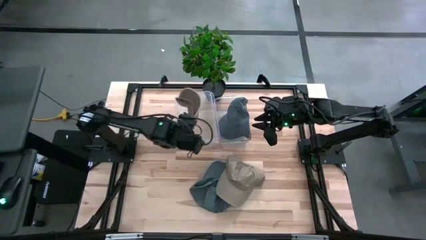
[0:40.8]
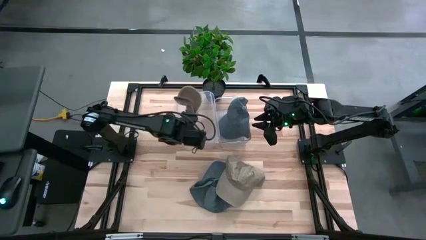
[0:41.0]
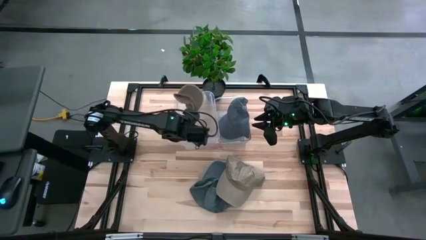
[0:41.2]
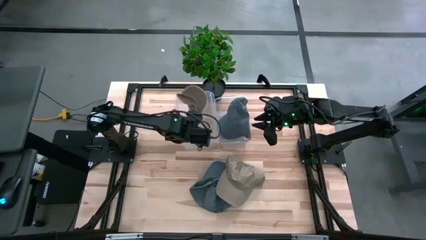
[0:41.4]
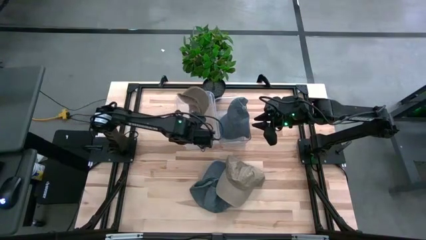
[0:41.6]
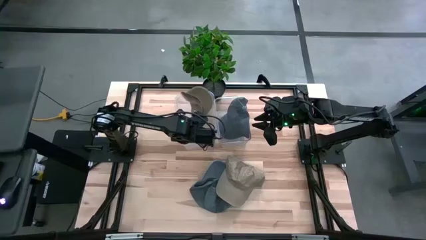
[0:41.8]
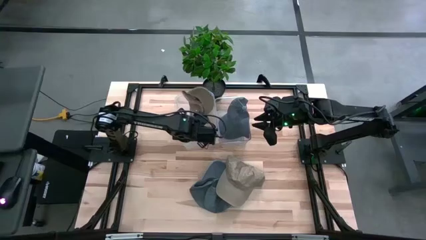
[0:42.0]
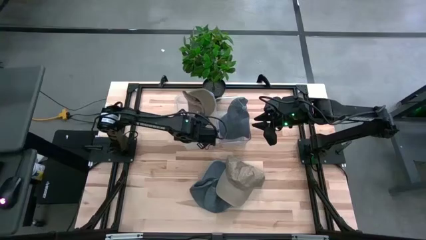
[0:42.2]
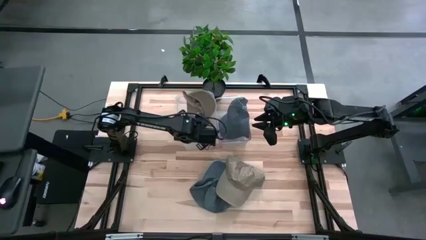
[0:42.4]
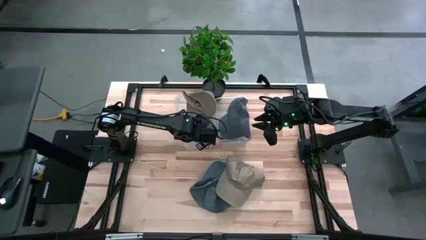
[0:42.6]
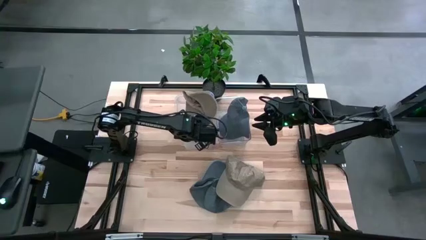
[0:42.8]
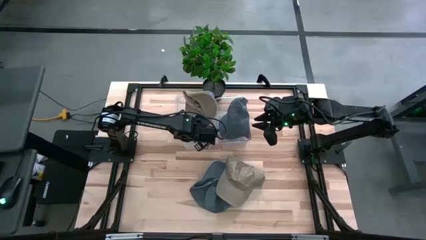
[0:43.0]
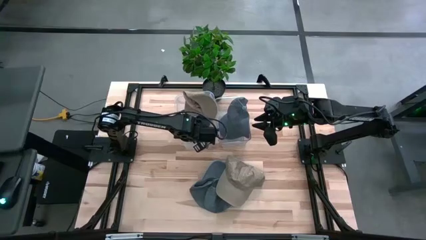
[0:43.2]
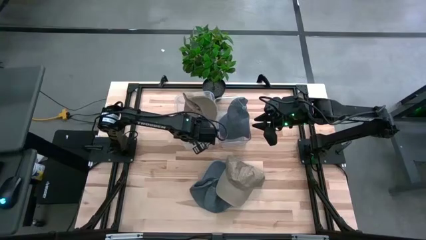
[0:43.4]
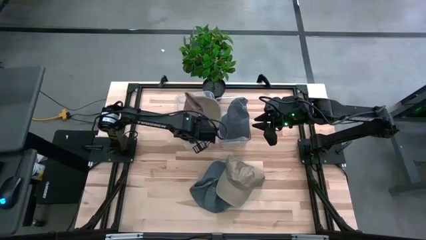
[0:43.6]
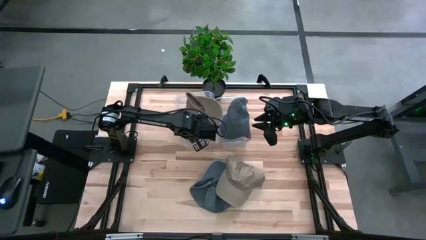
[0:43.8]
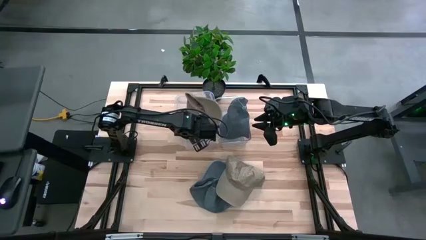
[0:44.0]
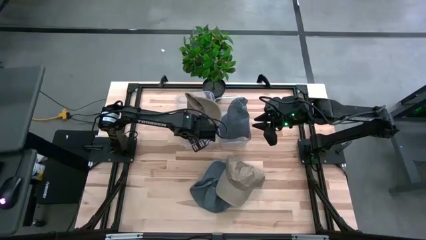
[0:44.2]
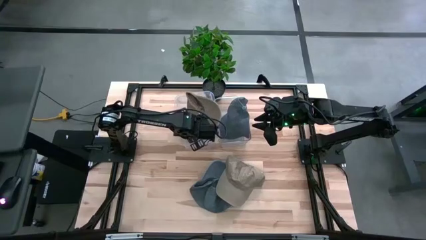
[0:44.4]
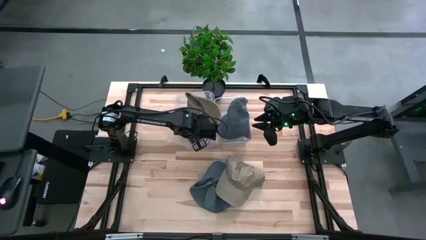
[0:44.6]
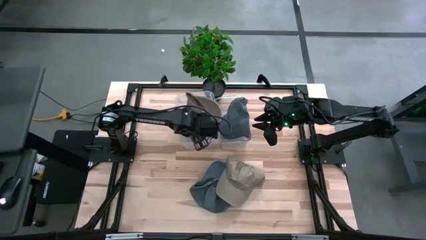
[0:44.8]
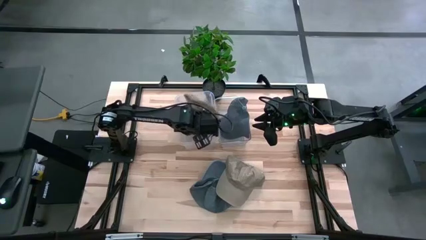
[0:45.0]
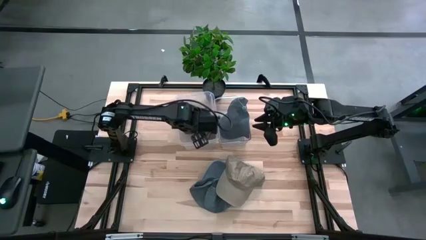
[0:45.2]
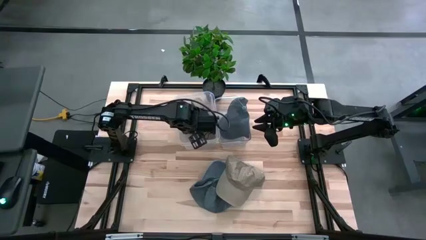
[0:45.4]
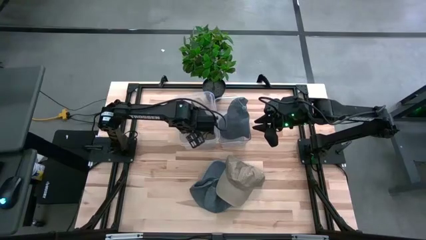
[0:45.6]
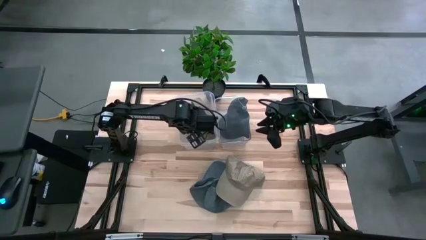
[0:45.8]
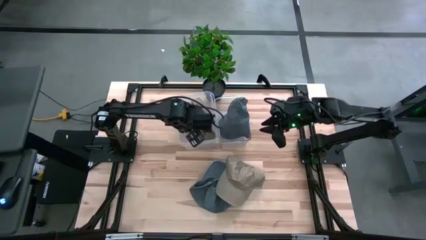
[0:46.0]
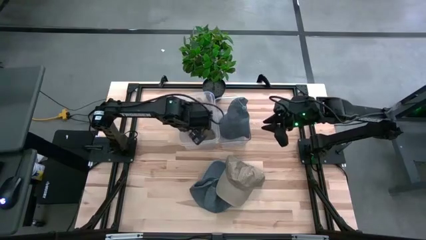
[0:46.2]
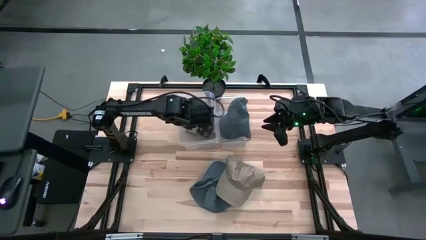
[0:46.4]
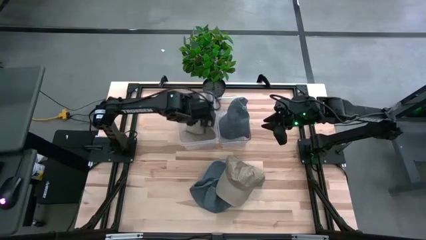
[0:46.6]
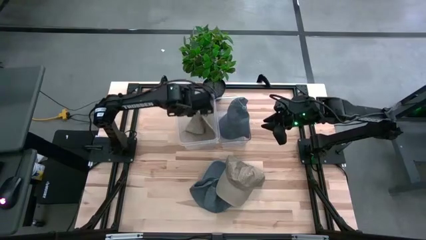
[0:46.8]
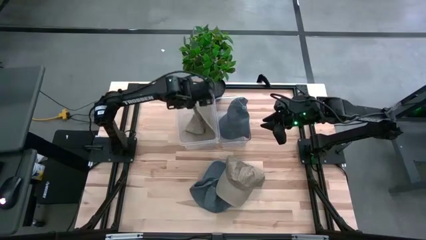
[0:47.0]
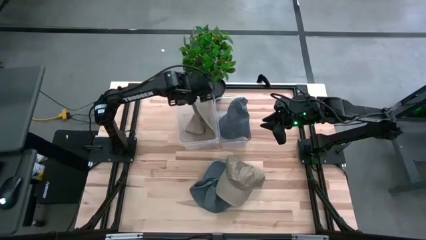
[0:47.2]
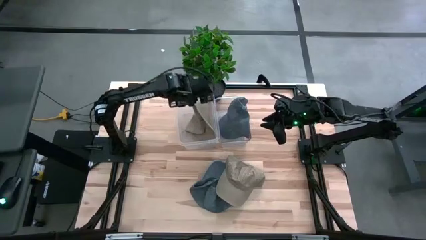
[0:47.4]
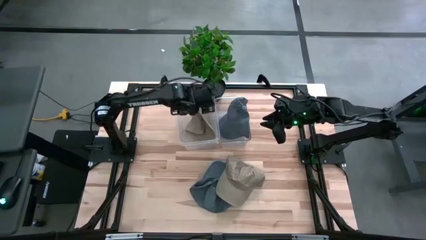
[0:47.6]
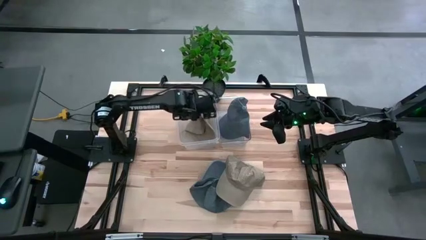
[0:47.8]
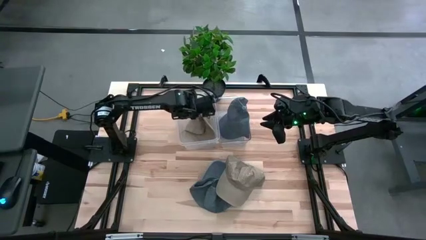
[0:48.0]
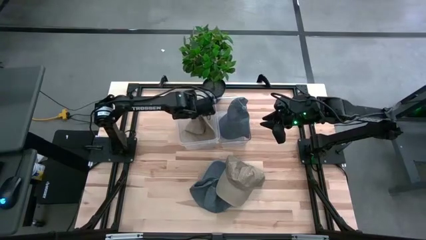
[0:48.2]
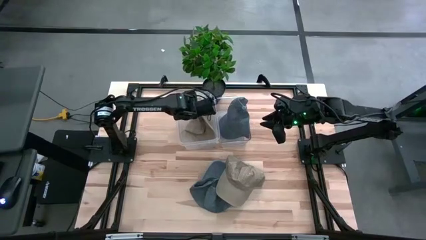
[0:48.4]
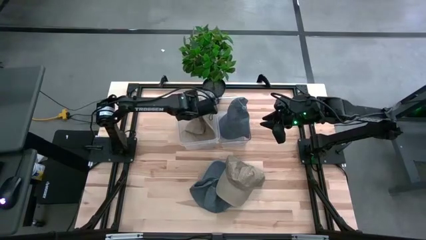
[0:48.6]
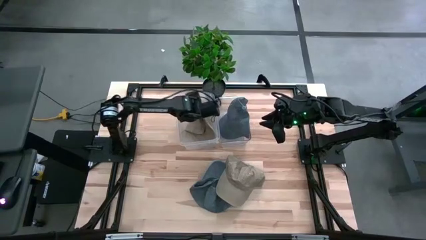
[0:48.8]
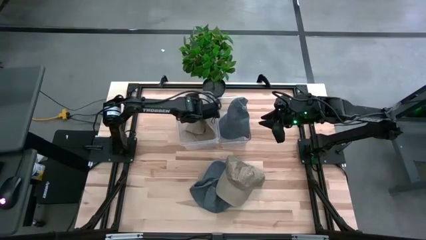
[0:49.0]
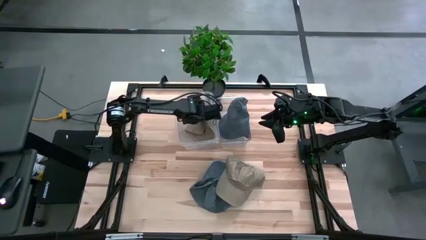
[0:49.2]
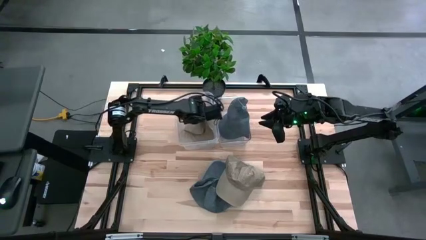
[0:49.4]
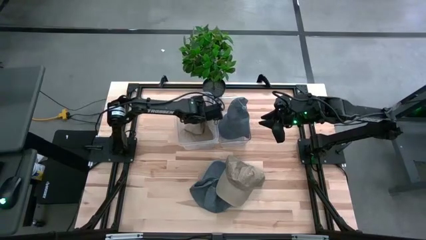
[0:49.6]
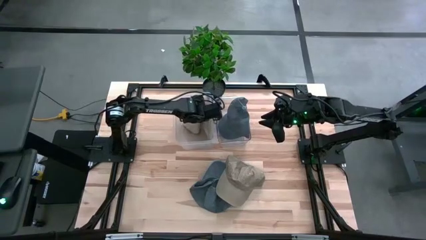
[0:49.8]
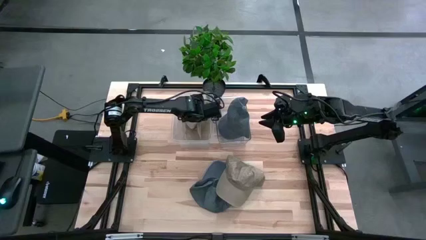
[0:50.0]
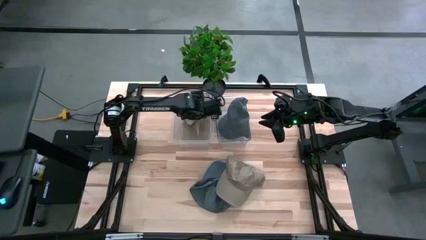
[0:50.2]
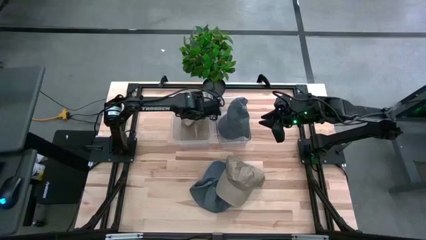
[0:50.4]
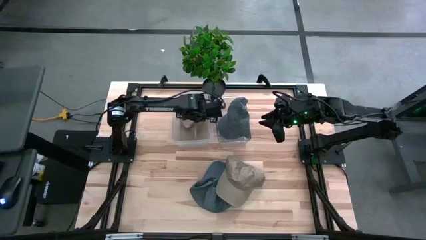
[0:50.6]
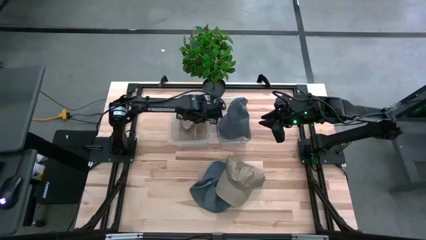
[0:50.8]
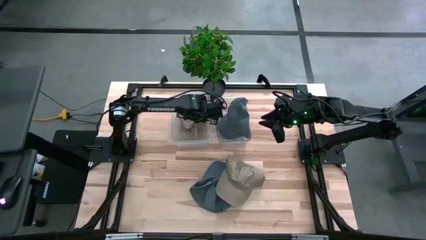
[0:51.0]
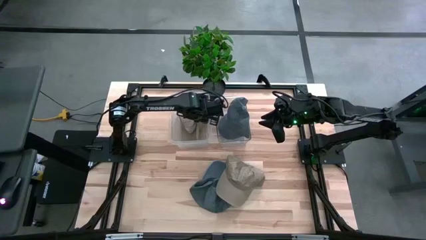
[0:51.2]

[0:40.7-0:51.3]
Task: Pick & Place hat
Put the left brown cap into the left transparent bin
